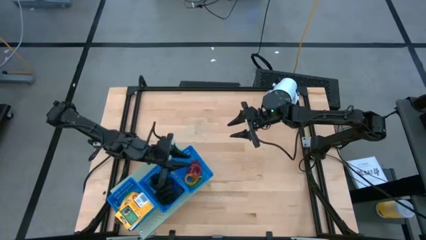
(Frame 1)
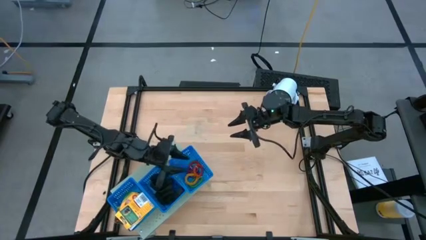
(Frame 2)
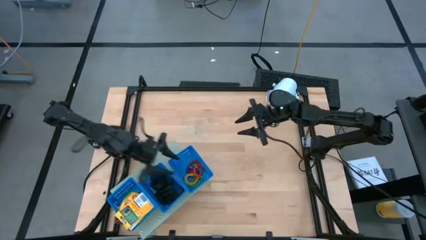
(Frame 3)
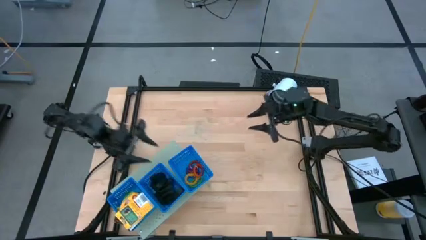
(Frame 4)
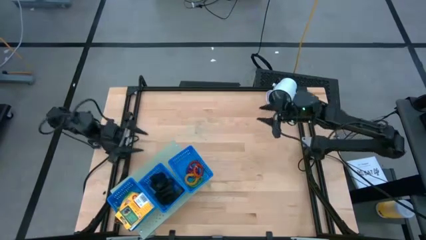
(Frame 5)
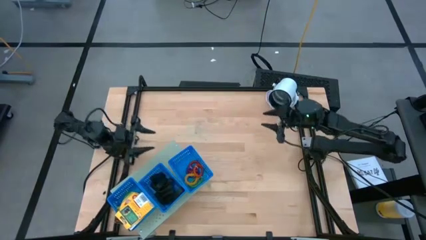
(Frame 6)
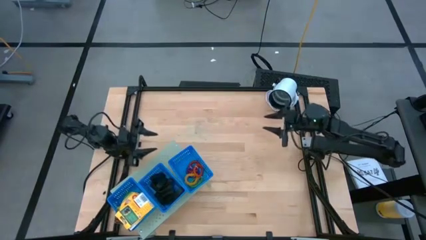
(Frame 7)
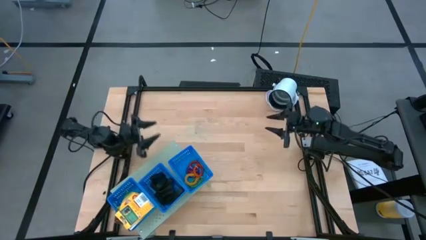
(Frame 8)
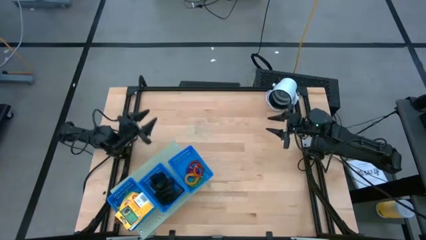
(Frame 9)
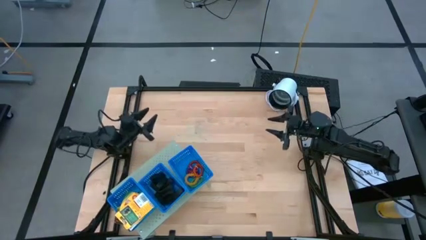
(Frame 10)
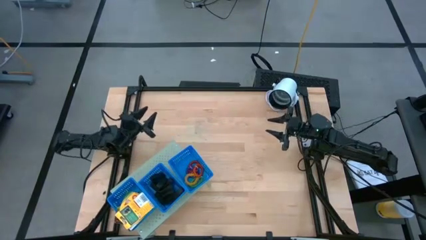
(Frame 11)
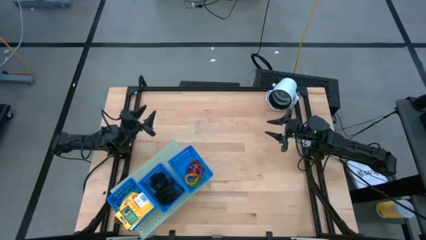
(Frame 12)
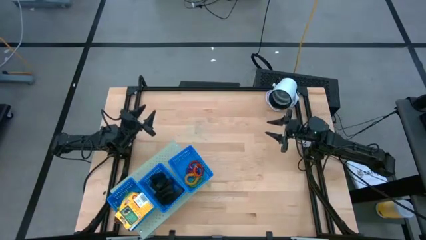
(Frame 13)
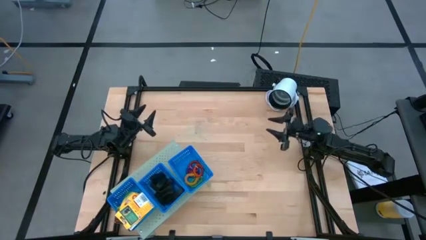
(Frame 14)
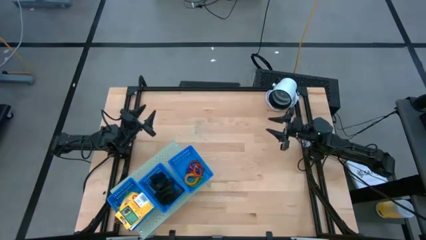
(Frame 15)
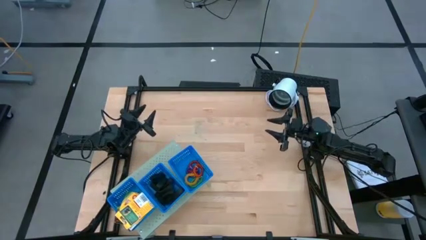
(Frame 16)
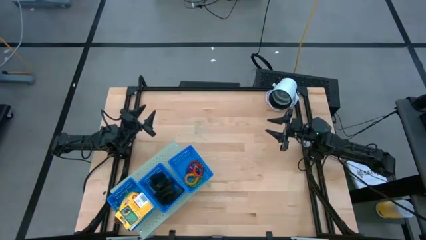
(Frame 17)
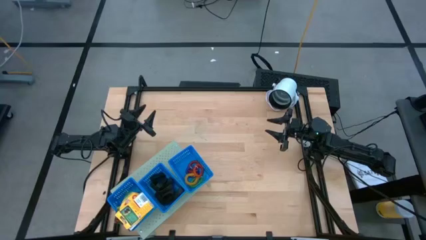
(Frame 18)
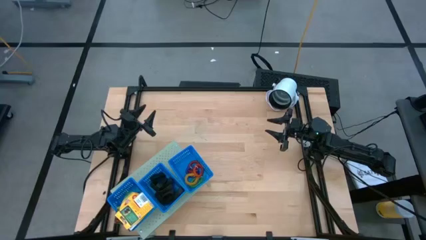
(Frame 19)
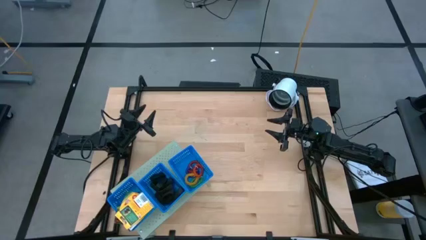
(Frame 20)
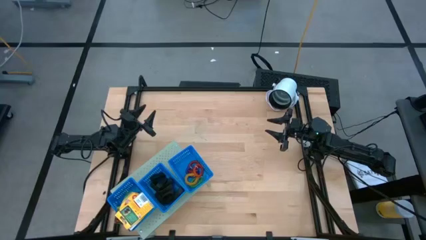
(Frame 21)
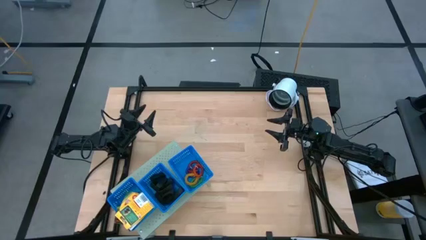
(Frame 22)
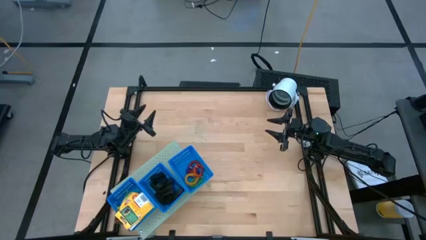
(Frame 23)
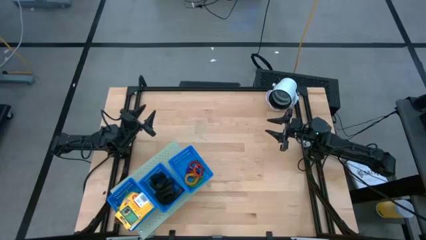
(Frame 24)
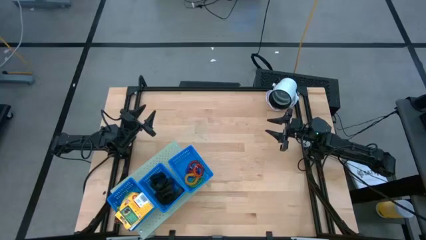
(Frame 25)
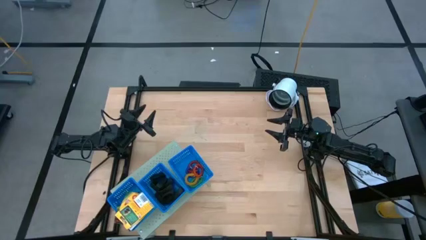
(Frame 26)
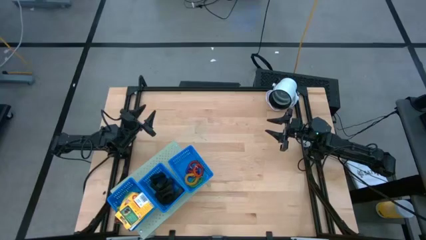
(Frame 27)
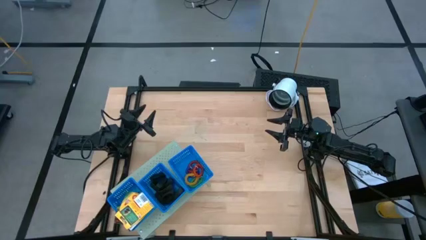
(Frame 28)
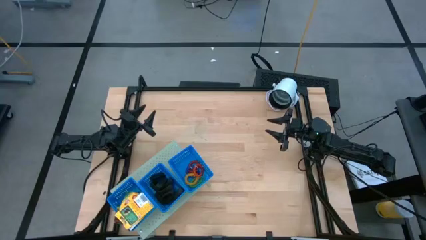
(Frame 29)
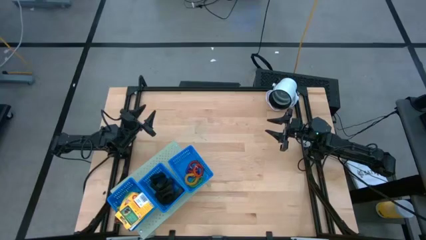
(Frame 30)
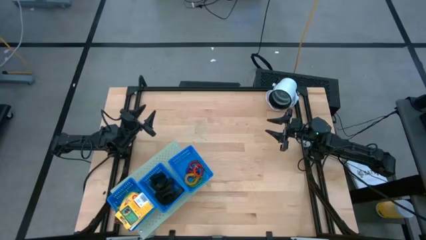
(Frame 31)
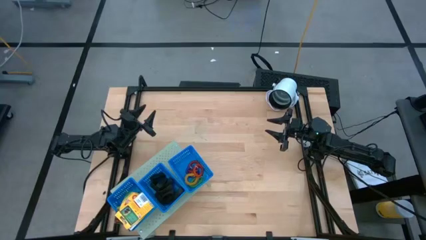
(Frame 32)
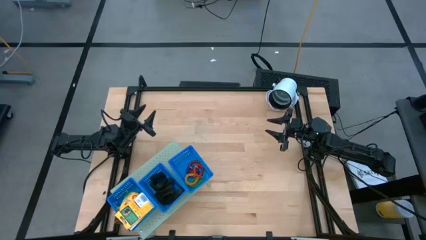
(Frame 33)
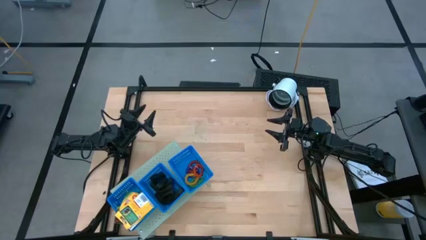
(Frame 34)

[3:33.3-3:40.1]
Task: Pick & Place Office Desk Supplies
Return to Home Position

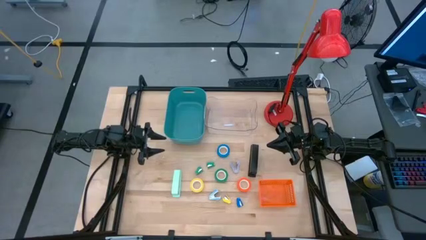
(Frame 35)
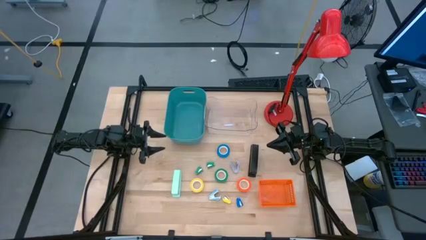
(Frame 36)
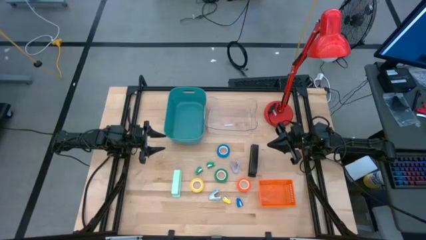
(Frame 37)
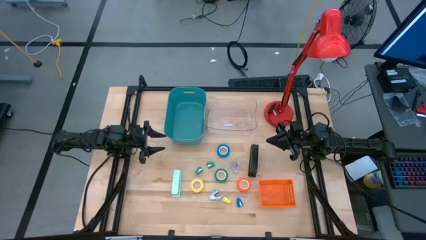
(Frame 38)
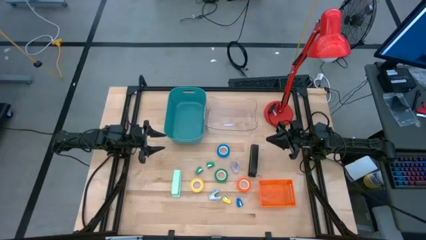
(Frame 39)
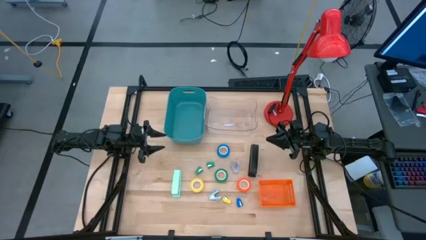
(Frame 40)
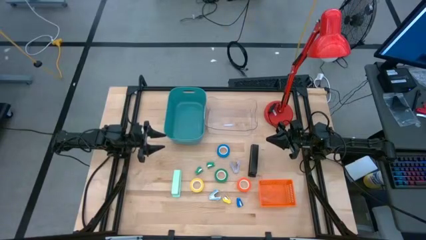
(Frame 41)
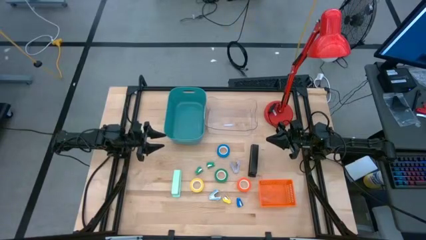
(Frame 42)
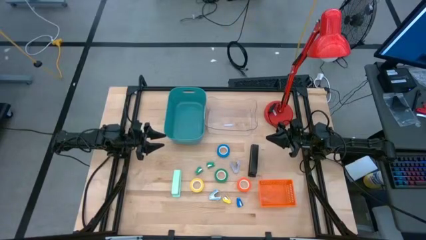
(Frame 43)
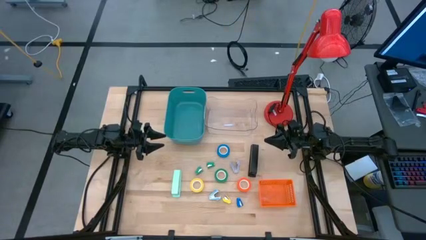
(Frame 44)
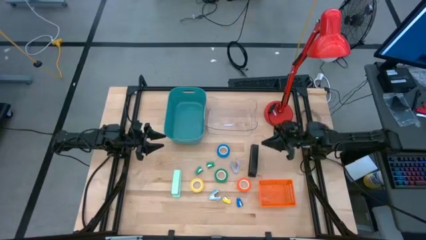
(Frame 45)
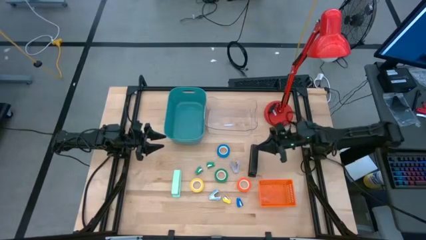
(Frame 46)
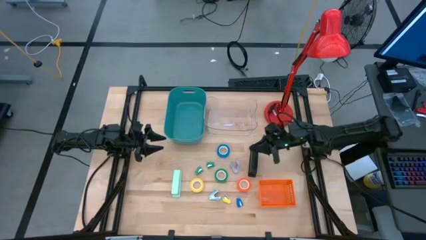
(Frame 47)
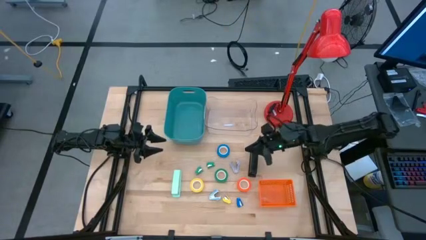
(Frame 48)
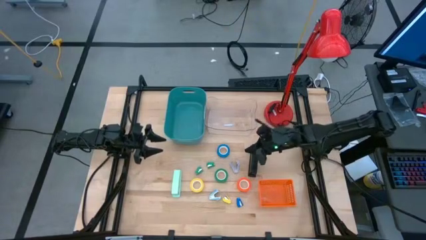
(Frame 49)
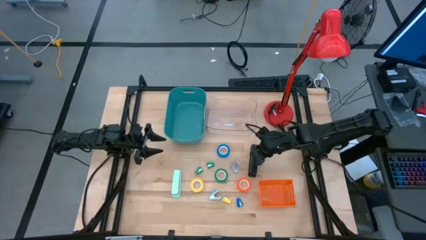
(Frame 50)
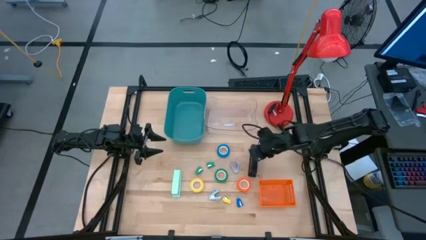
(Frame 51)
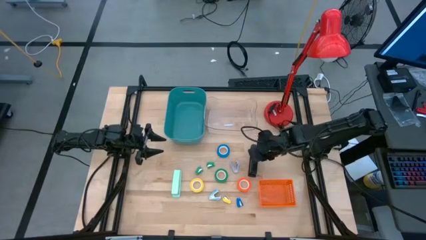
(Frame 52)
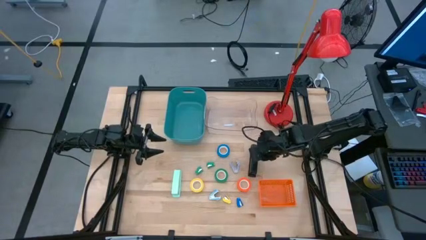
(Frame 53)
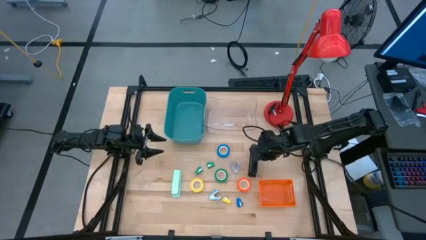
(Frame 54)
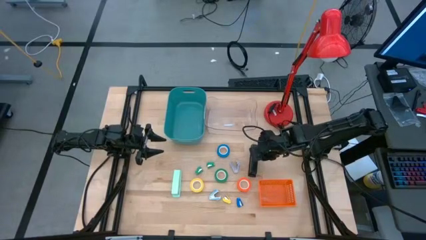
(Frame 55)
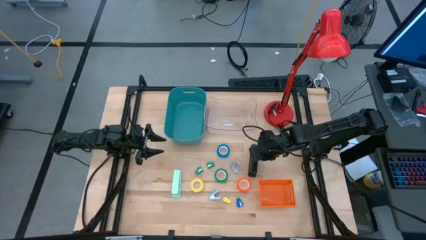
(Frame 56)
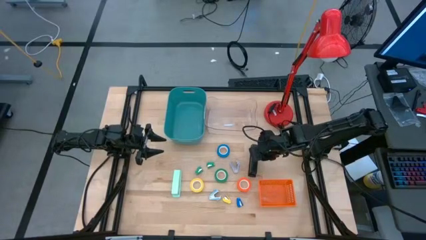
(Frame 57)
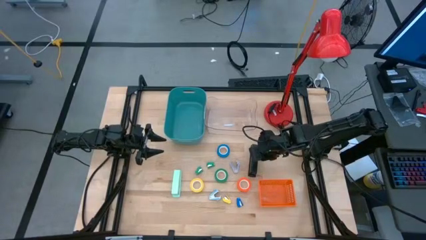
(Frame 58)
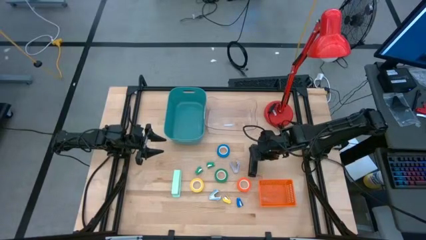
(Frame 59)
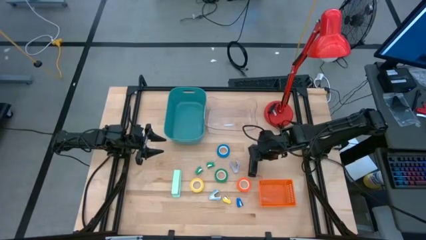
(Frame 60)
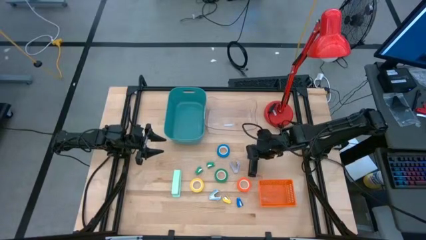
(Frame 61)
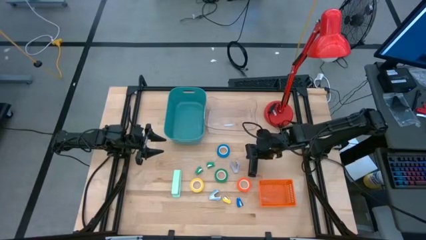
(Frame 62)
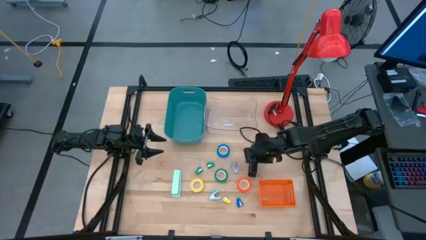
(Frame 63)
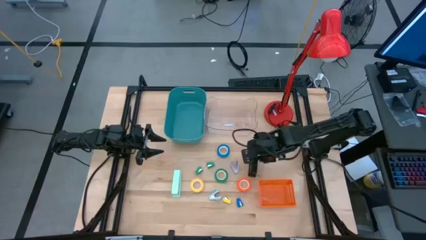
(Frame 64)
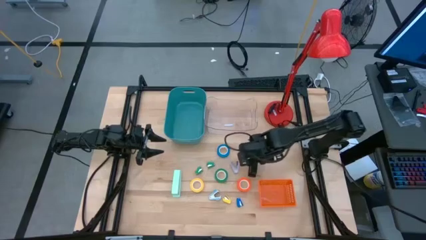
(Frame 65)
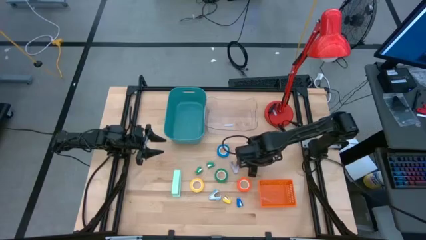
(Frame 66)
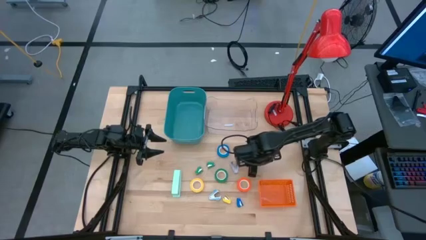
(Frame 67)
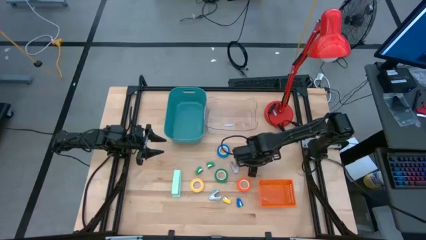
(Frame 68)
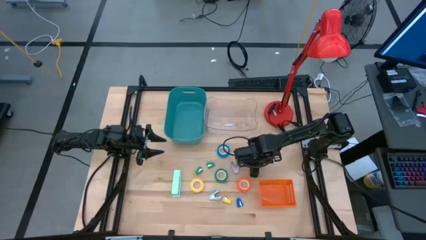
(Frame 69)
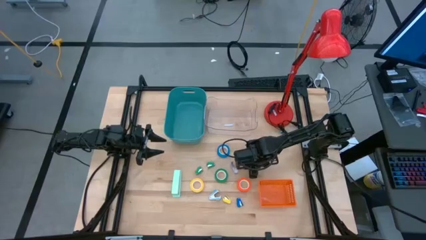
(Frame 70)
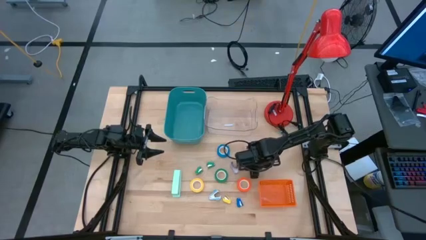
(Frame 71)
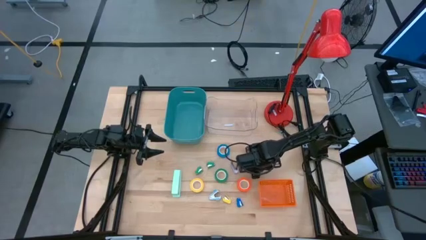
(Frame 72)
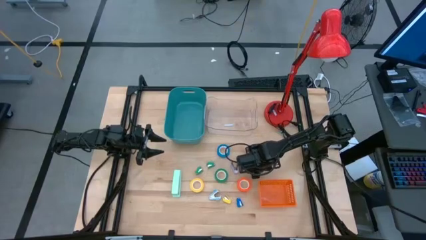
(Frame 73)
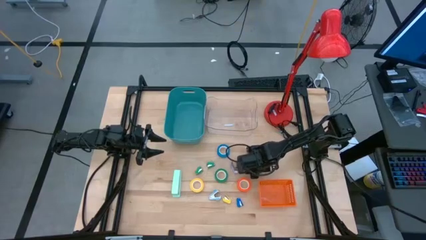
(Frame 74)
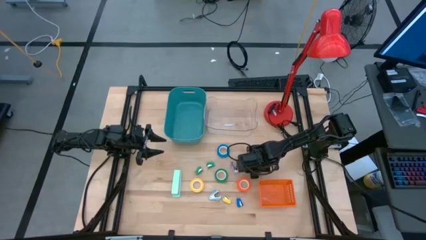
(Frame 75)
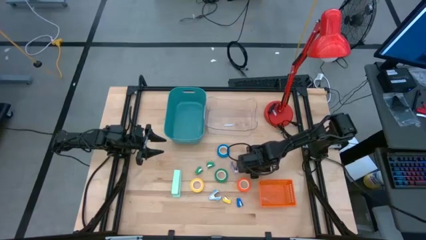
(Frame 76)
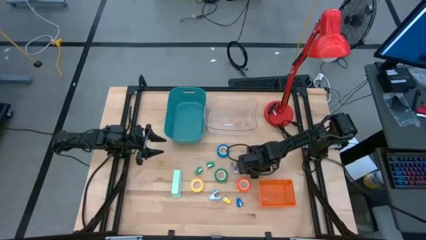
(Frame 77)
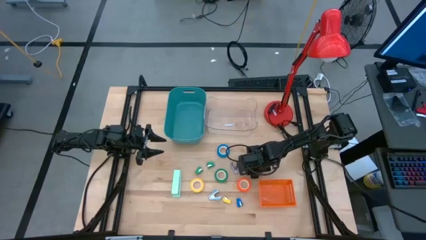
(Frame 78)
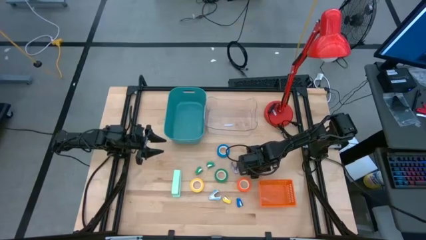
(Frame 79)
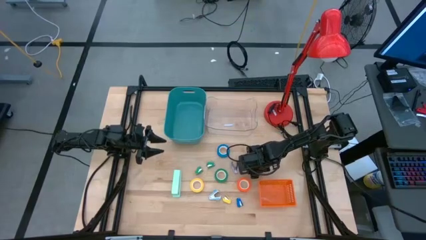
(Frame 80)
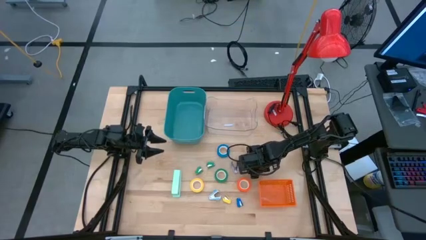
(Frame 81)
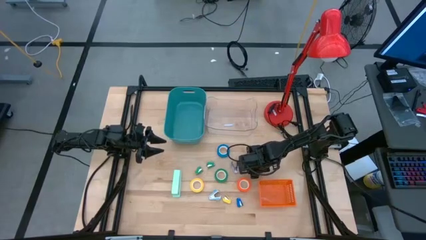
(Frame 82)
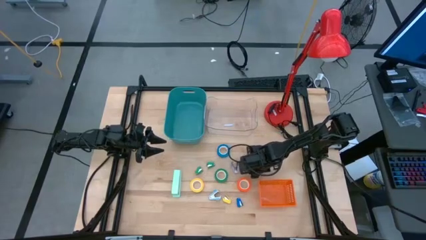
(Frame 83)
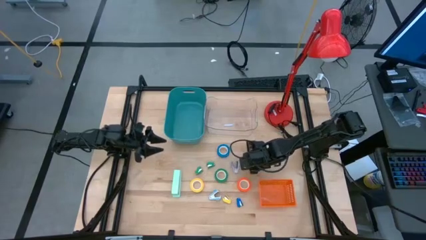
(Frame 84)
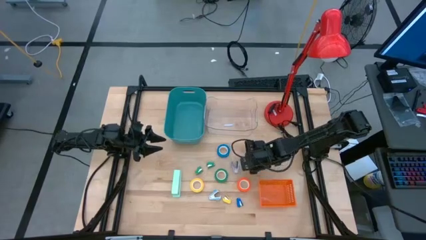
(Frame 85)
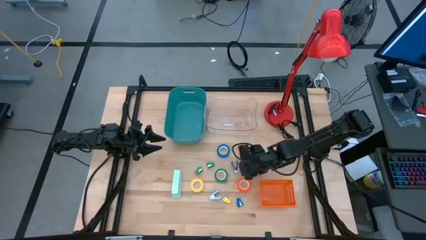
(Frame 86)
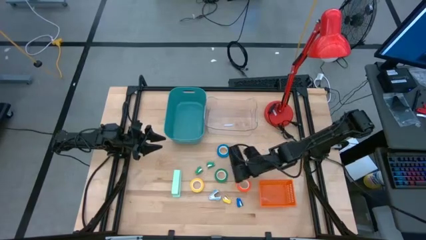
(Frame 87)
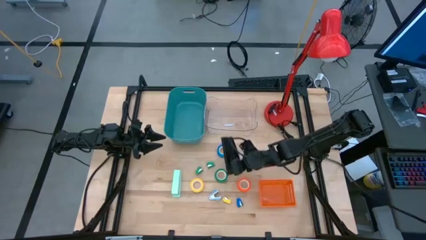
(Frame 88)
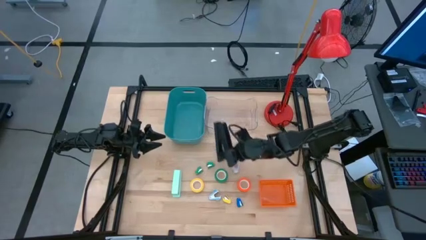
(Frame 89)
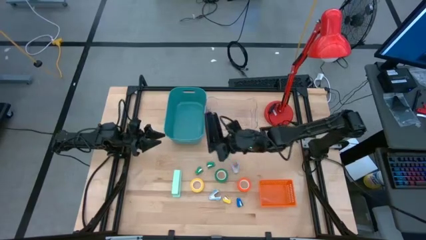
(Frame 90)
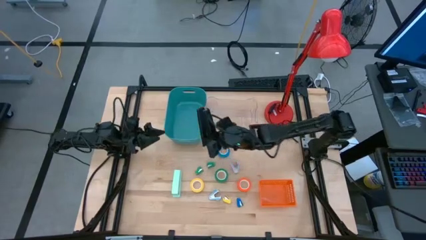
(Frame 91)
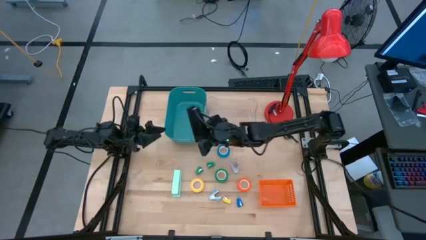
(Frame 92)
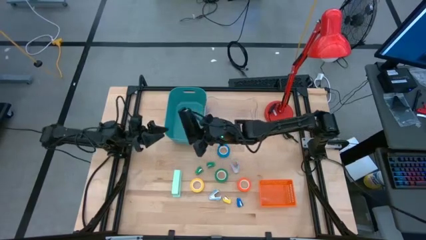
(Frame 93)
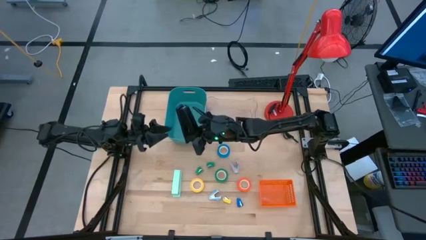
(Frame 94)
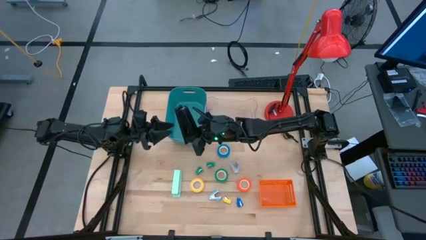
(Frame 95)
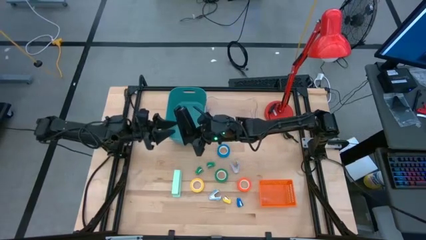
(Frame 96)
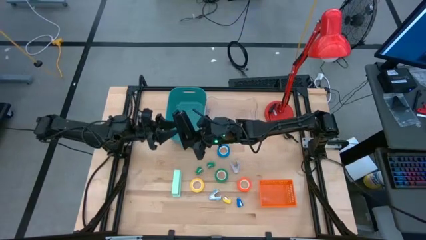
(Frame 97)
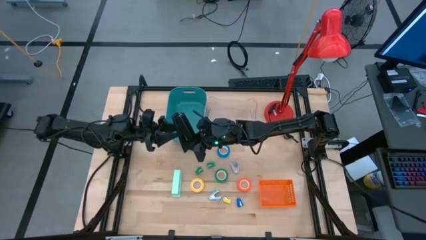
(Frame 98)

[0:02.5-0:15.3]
Task: Pick and place Stapler, Stapler remover, tape
Put the large black stapler into the blue bin
